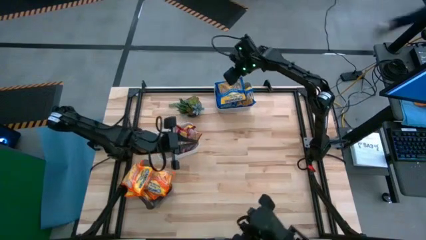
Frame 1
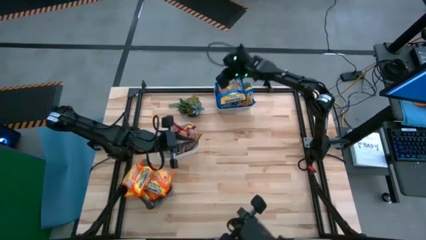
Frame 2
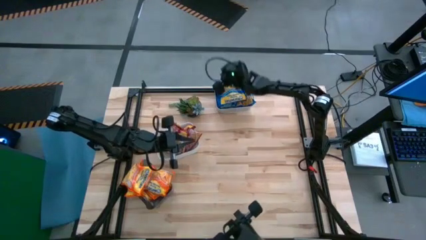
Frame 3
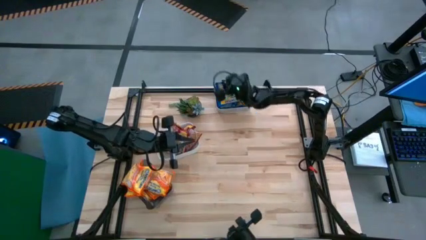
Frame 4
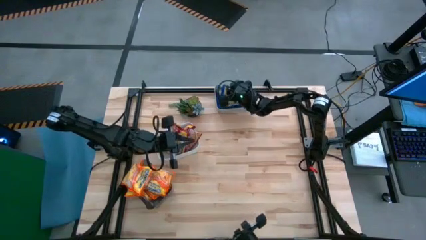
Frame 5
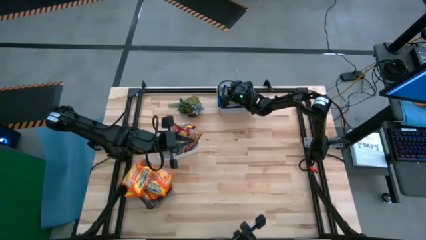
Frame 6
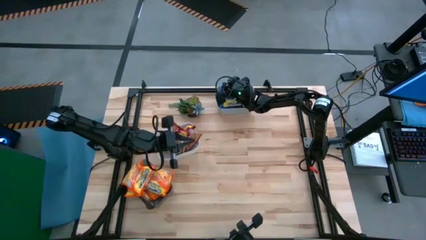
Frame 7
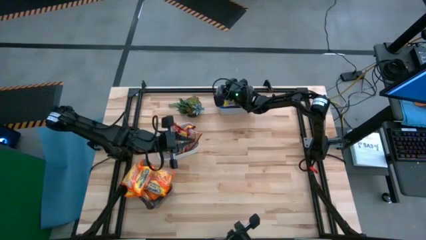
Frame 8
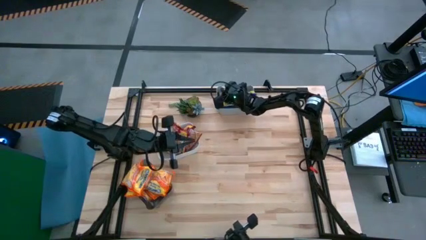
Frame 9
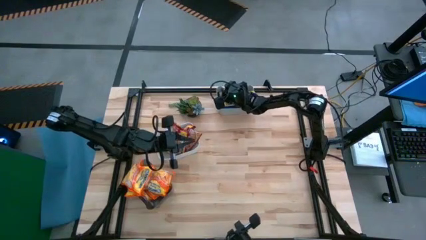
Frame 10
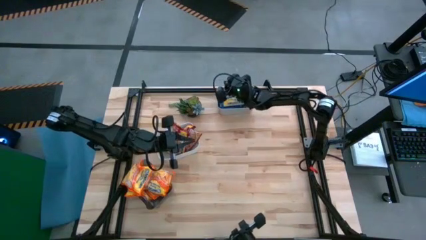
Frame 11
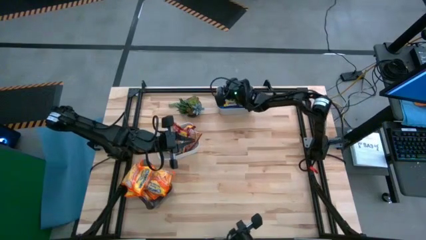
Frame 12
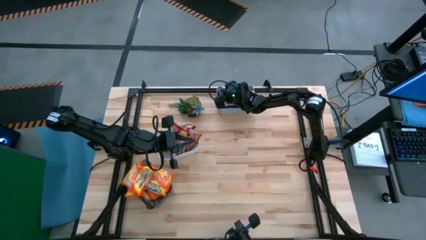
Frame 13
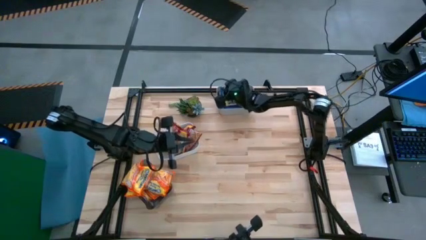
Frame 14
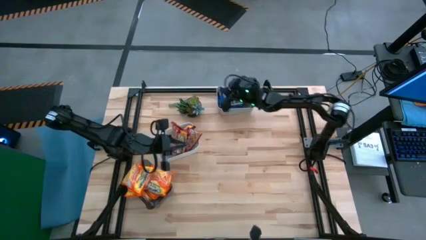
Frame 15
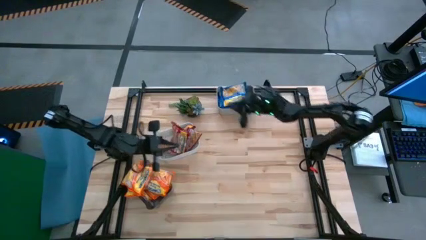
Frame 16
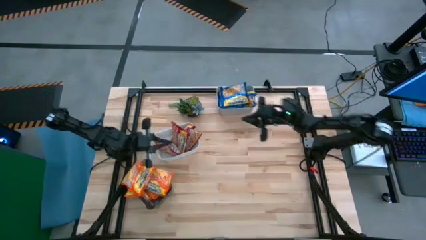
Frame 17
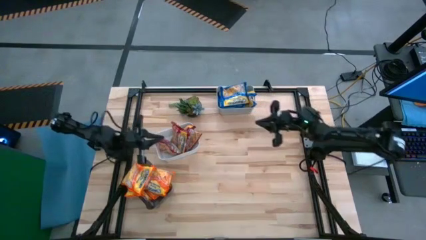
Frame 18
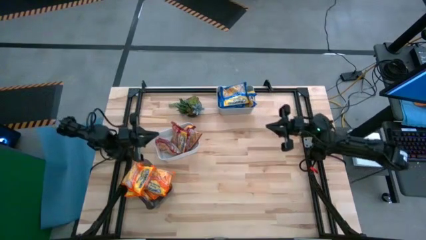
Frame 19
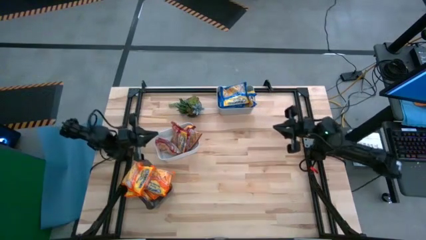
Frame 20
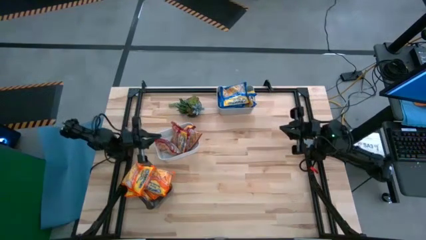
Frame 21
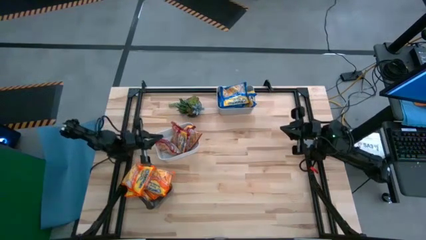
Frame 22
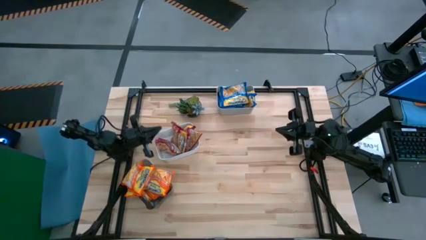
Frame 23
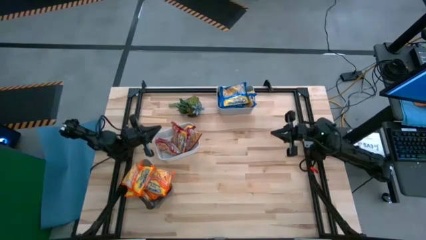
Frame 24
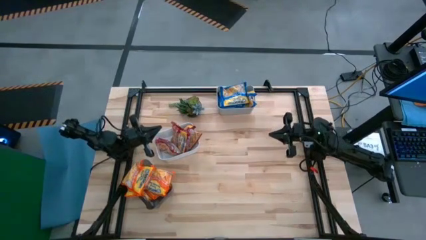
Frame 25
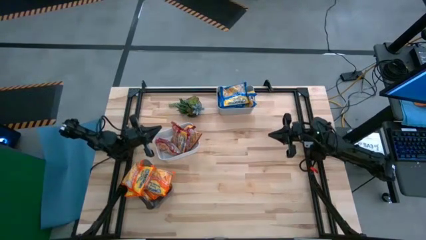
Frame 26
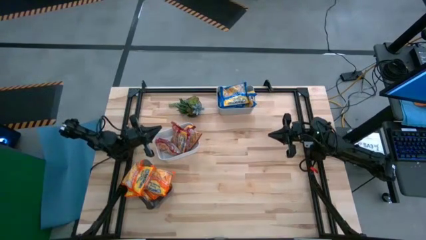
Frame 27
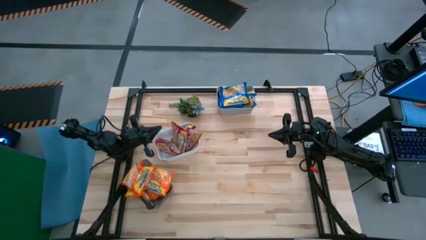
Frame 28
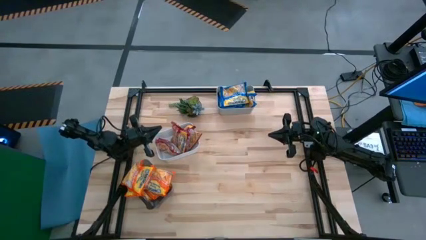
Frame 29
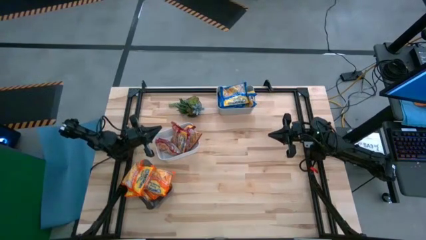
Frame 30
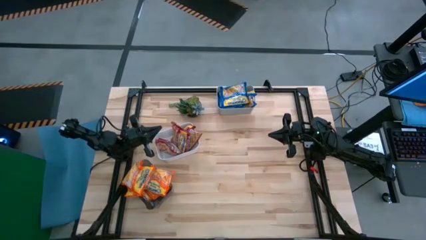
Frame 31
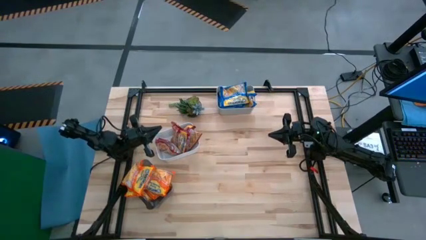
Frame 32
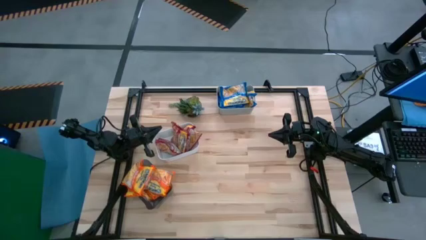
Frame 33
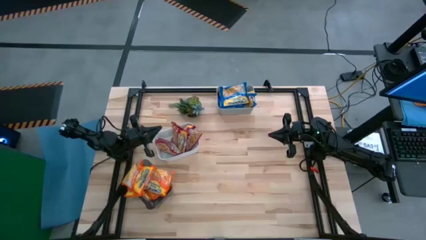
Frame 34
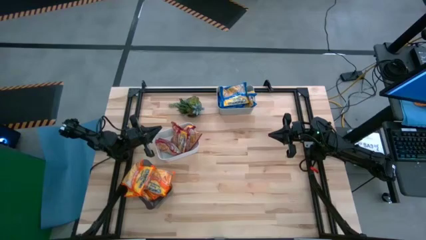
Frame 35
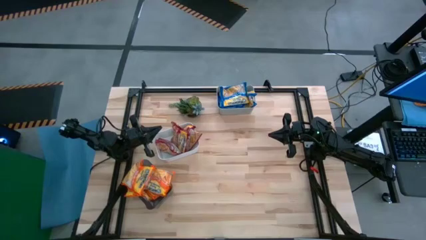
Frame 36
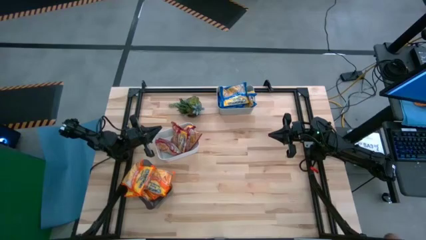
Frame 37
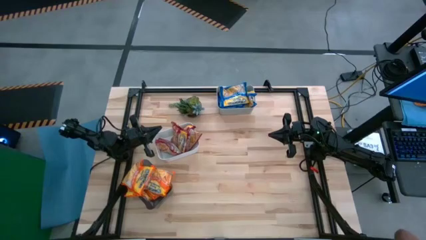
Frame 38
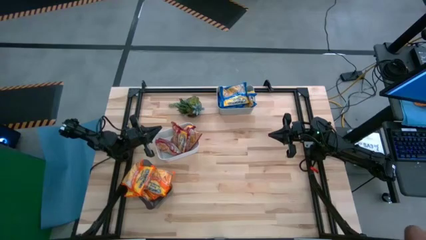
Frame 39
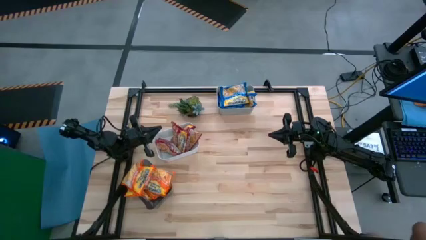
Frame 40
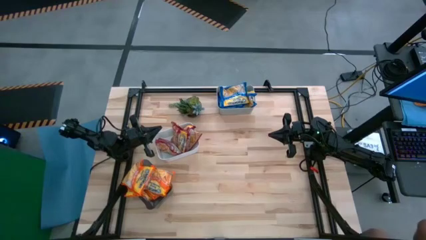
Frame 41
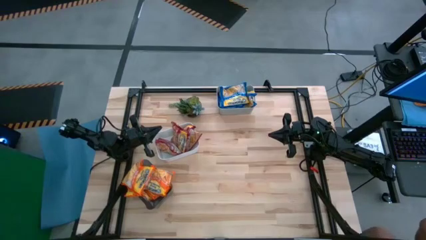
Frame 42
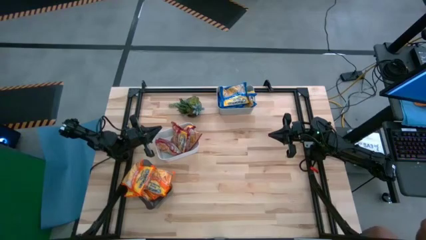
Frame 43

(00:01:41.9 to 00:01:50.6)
Task: Sort Maruchan noodles
Return to Home Position

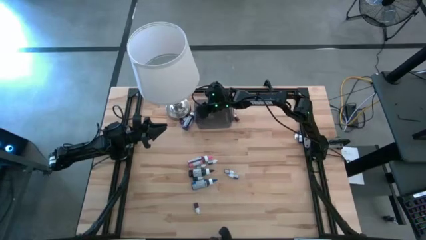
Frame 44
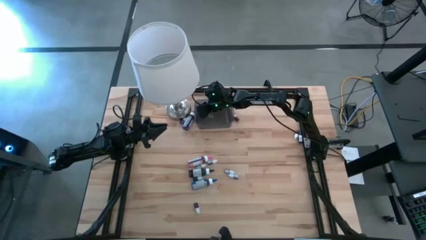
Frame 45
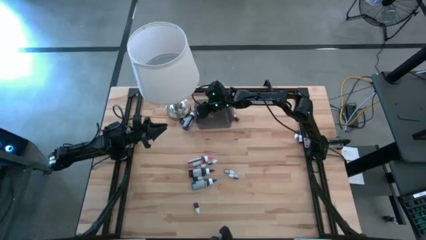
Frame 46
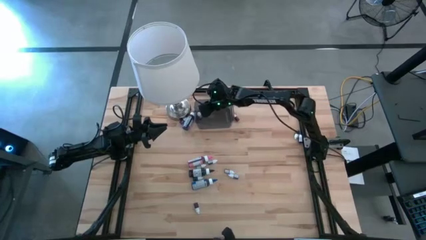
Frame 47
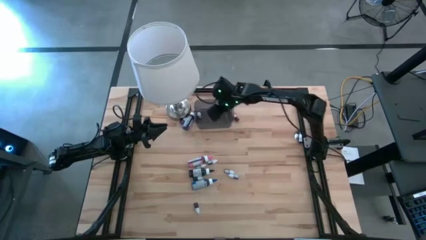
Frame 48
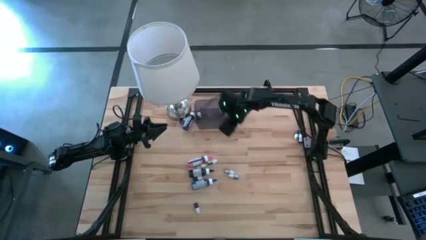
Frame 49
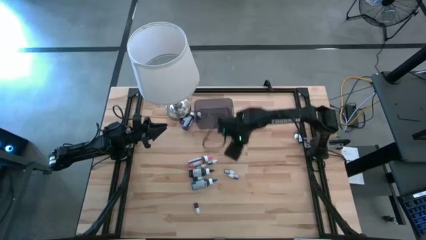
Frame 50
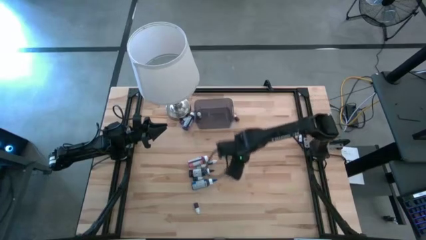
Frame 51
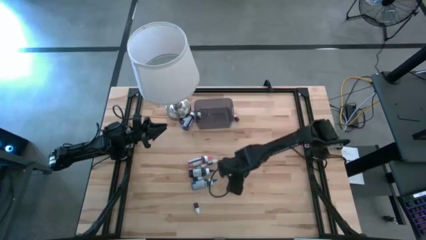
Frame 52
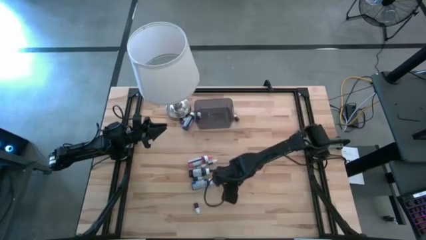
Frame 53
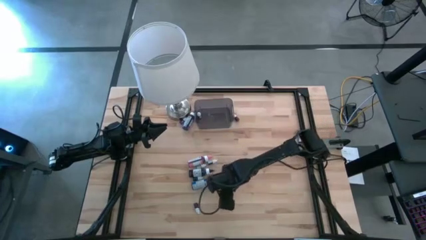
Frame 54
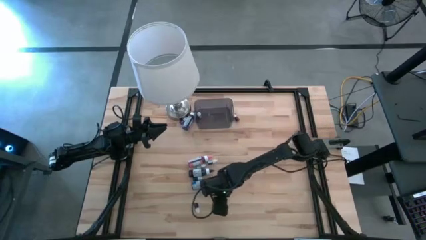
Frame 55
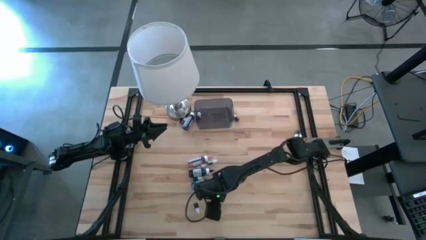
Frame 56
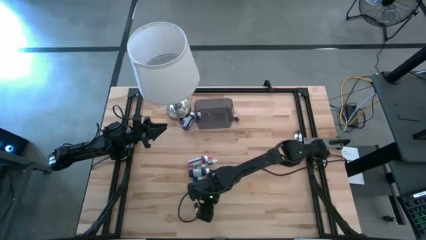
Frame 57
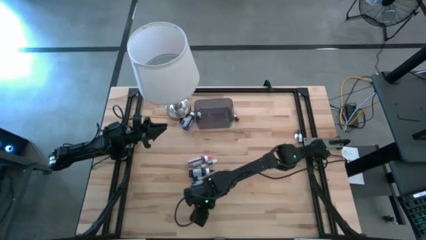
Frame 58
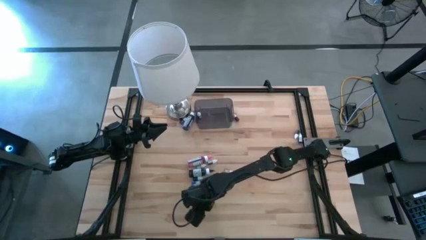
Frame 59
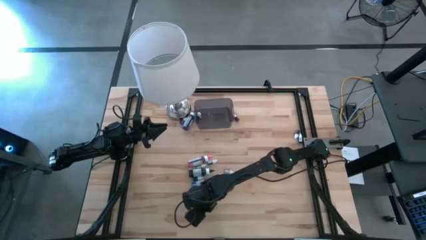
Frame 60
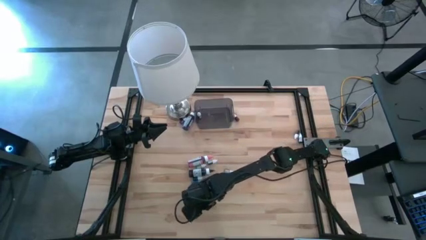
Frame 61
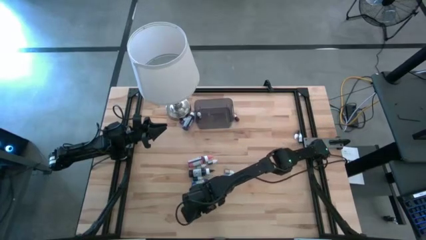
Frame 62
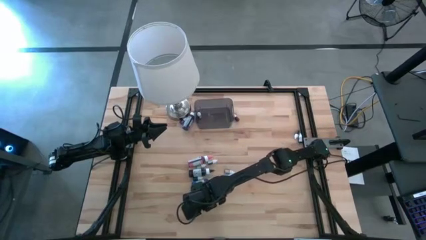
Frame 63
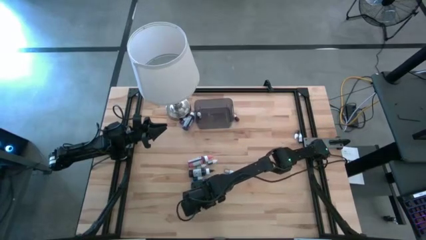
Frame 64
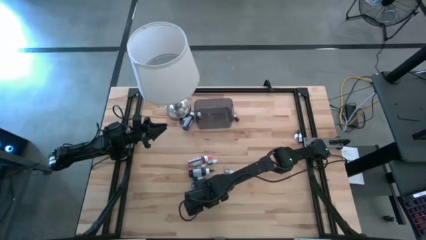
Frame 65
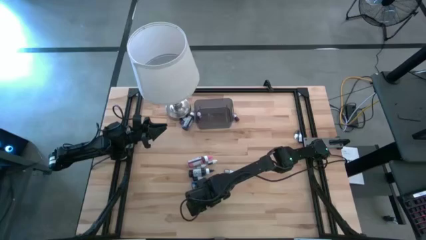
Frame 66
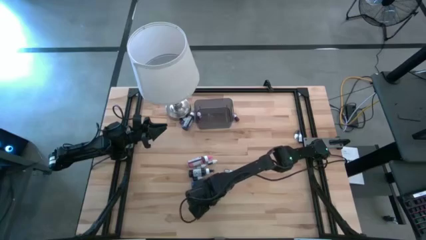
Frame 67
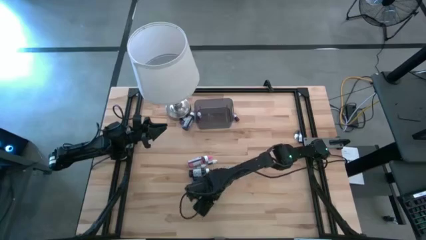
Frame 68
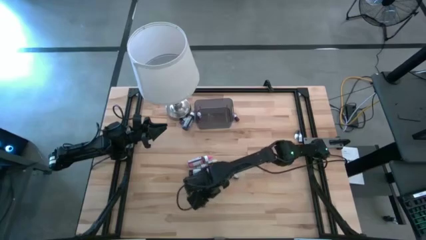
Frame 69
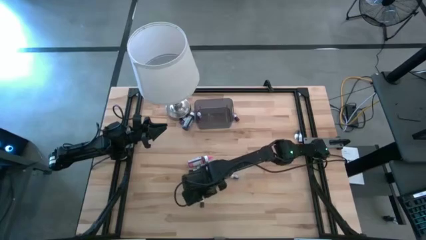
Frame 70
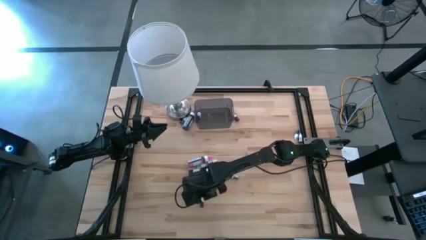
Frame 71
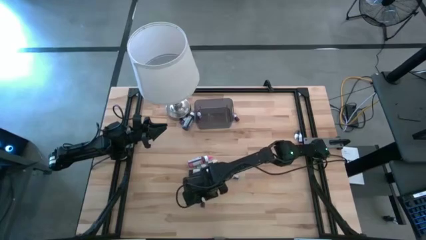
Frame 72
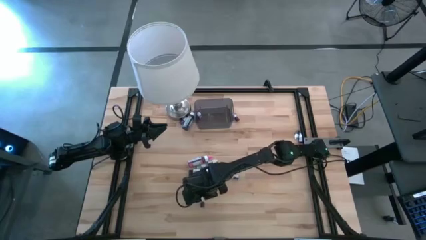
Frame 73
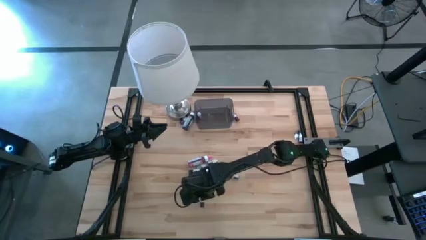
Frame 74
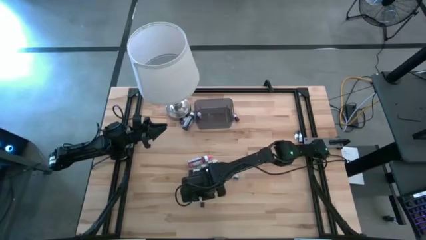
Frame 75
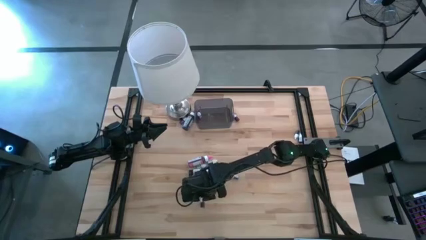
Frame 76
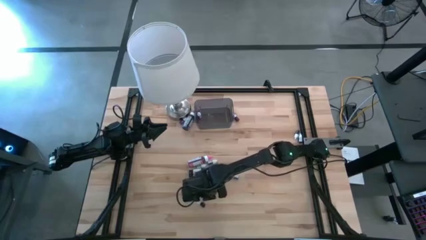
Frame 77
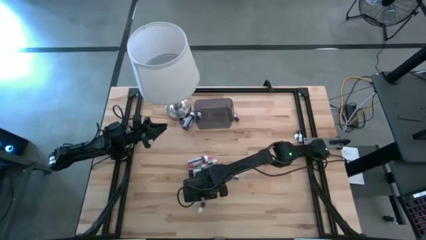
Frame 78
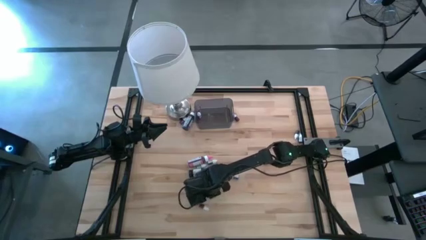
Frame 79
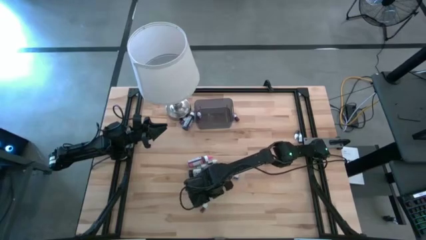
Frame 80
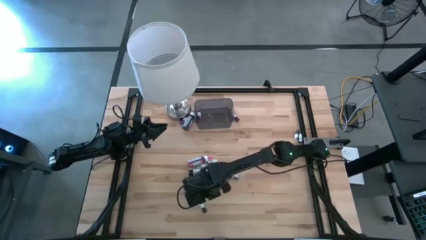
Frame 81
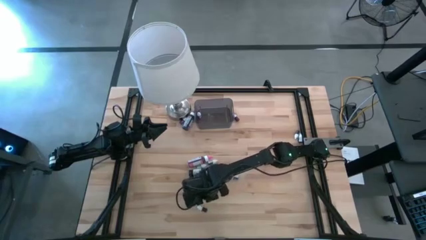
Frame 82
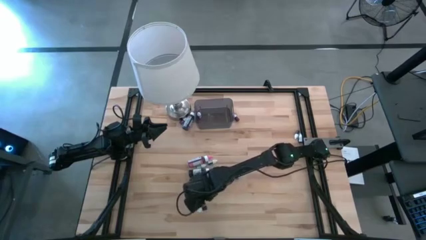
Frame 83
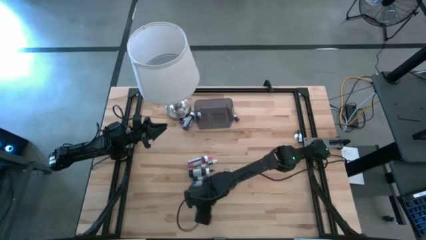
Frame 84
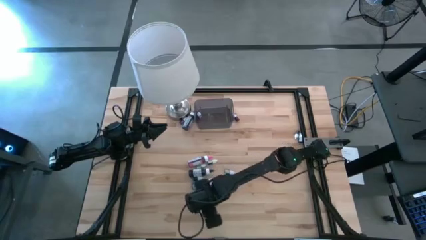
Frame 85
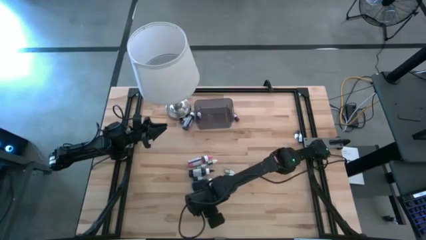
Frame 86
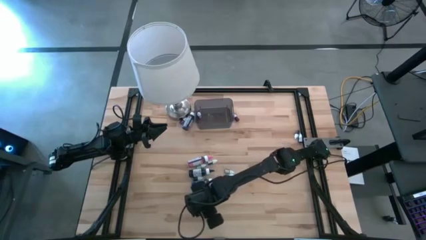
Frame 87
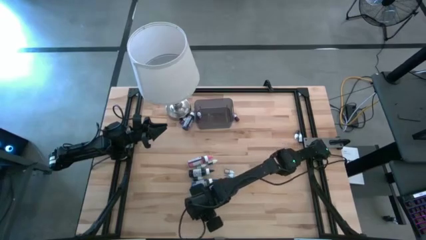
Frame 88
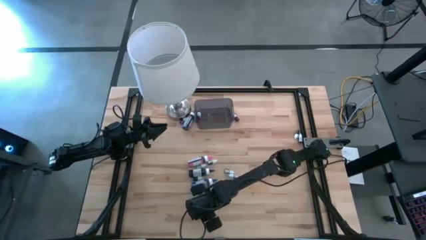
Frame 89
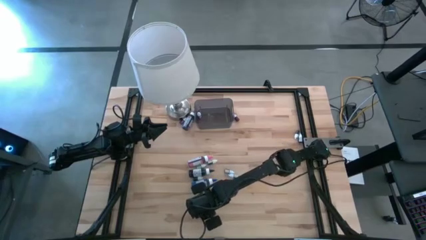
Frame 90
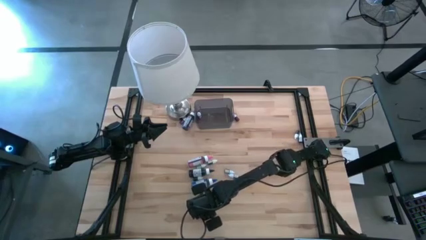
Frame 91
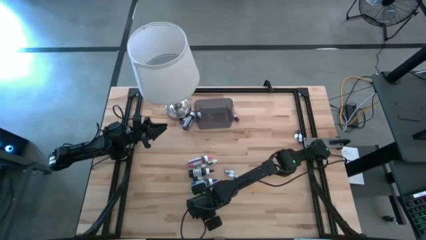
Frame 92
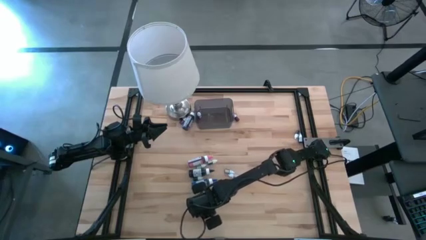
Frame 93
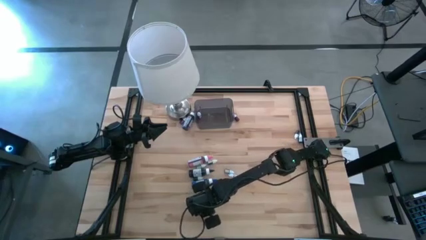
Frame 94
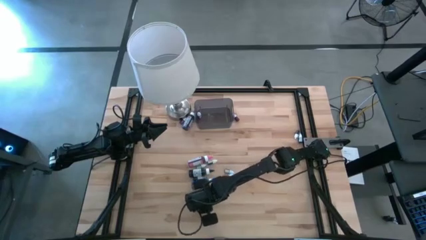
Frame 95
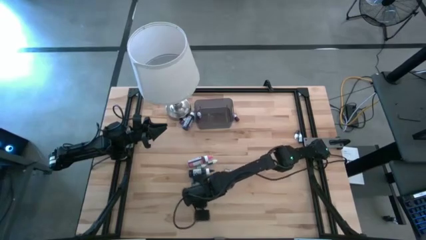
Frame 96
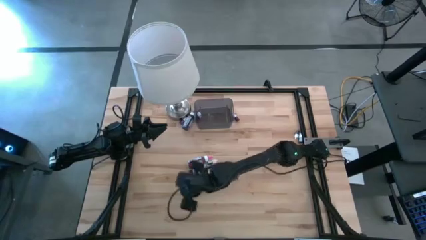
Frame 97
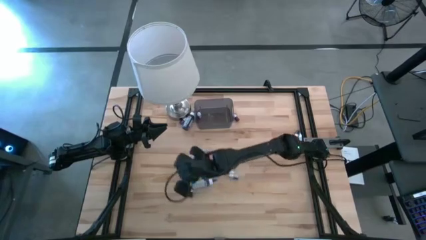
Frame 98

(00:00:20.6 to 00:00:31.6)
Task: Pick & Place food coloring
Put the small red food coloring bottle into the bin
